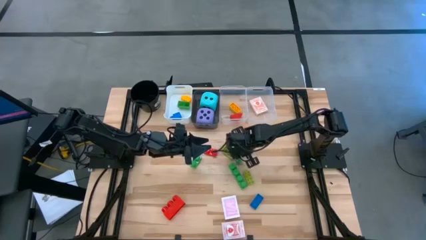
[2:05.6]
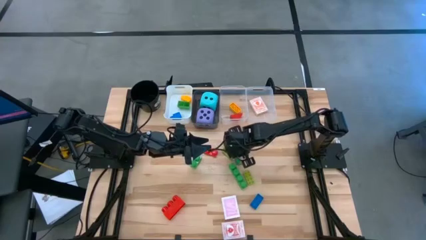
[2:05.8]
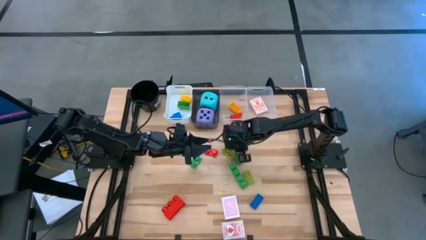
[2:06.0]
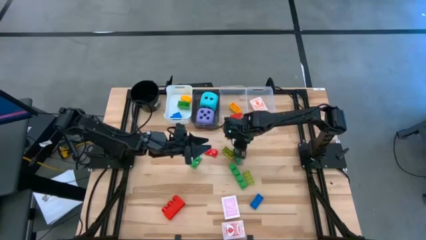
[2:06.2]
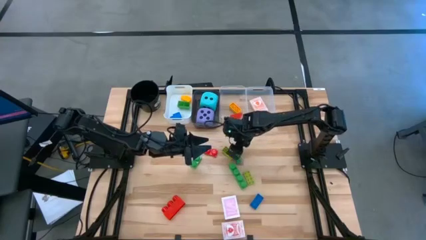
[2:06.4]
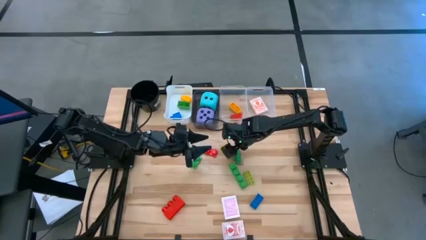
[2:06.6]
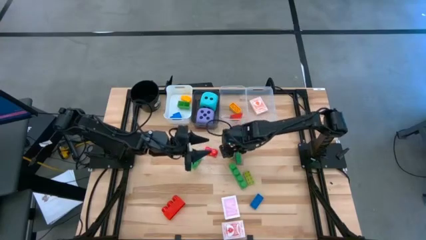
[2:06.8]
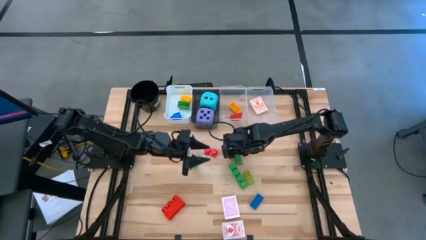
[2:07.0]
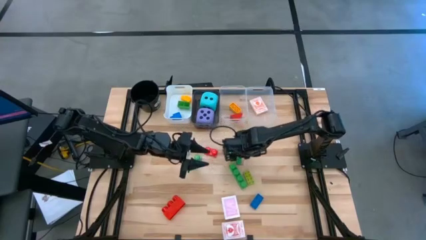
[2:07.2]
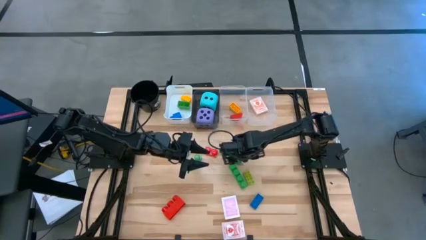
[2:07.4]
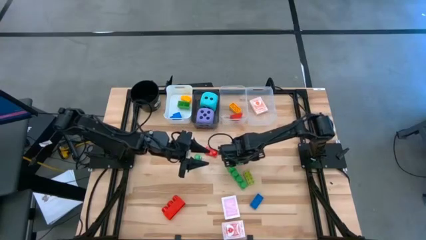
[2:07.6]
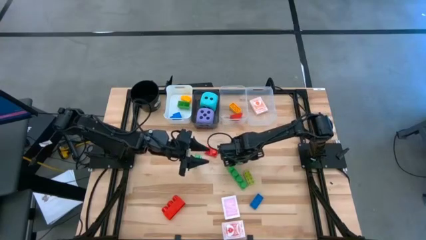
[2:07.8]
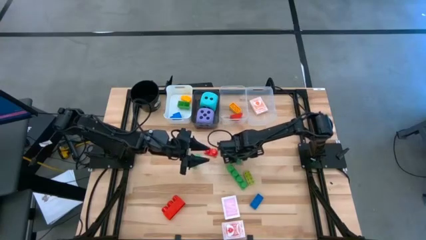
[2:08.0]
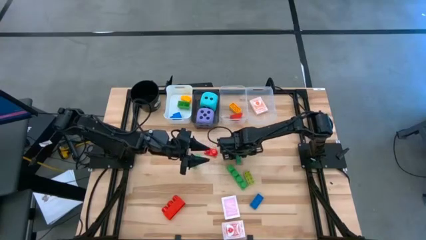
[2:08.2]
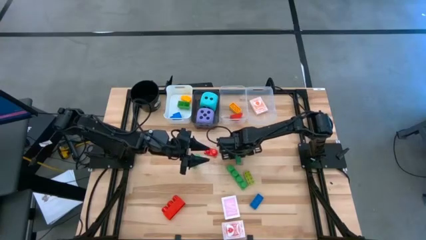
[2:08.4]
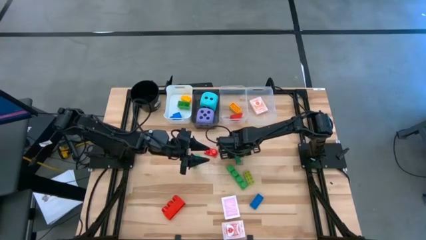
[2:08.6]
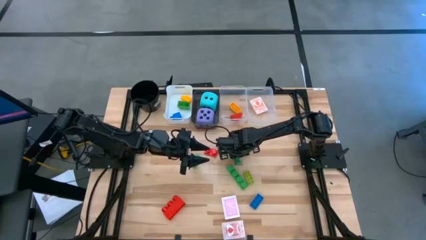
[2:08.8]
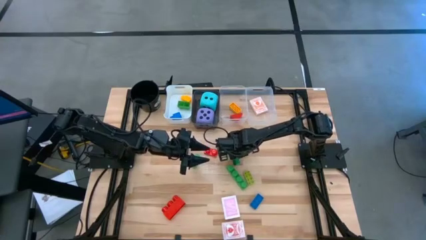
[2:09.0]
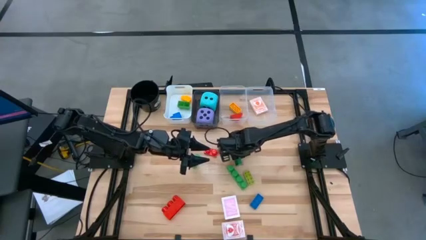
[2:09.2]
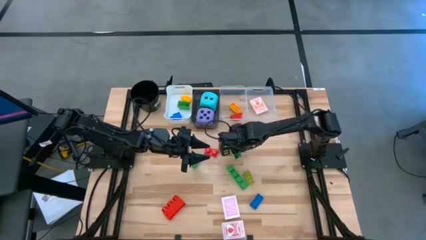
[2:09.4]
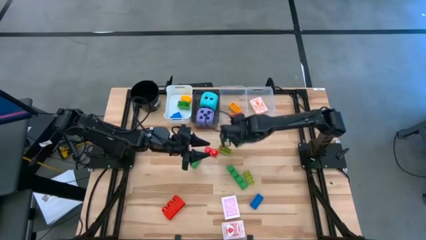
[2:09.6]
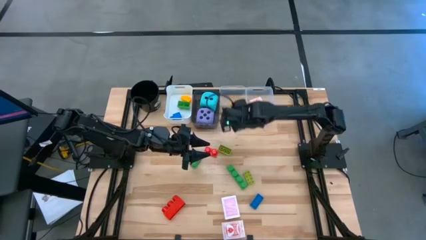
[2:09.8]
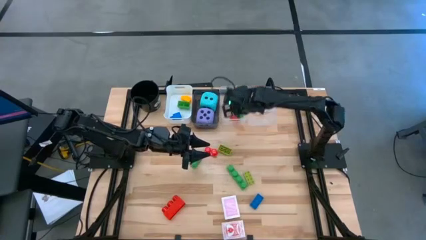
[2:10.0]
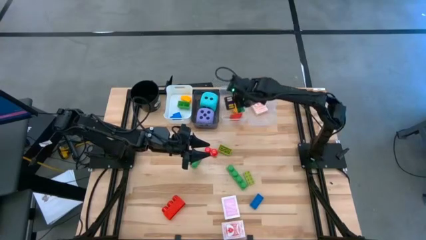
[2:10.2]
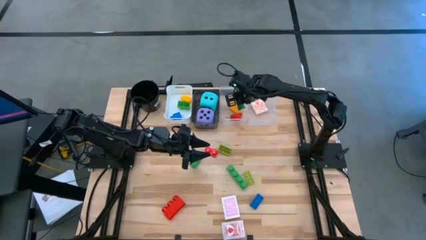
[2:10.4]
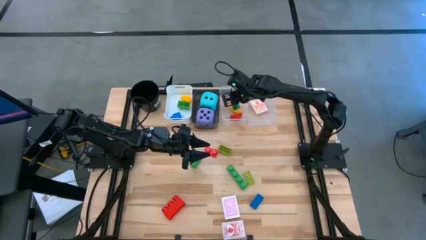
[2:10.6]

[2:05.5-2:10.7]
Task: Pick & Place Toys
Put the small dark green 8-stud game piece into the left transparent bin

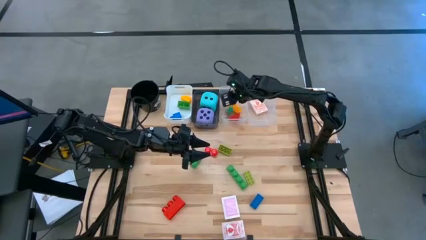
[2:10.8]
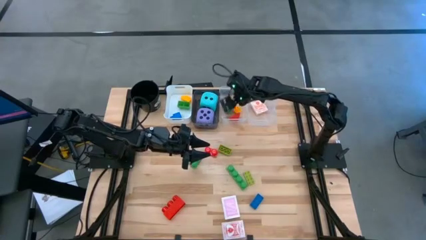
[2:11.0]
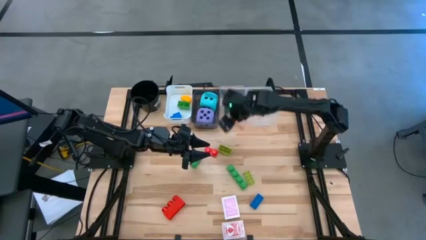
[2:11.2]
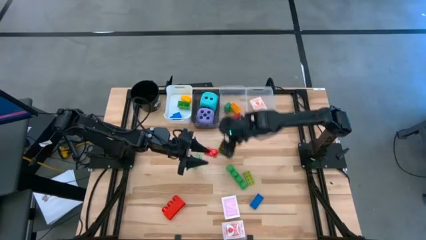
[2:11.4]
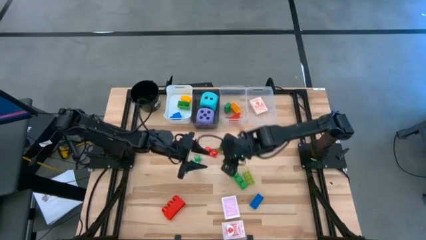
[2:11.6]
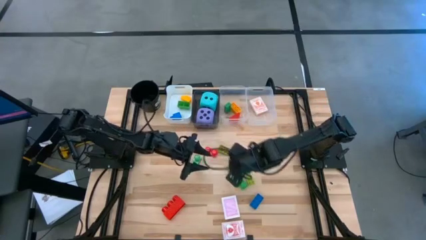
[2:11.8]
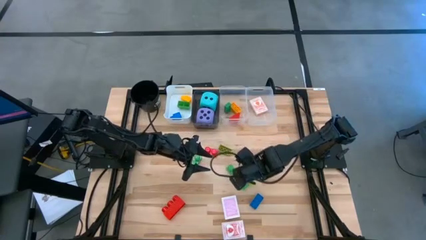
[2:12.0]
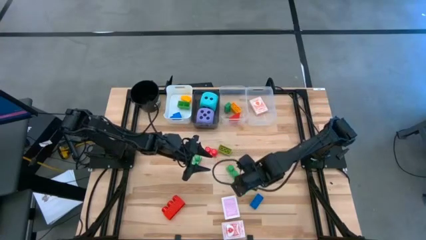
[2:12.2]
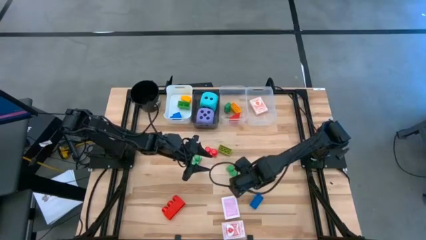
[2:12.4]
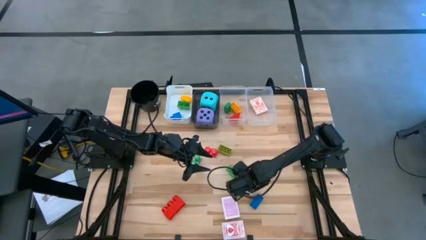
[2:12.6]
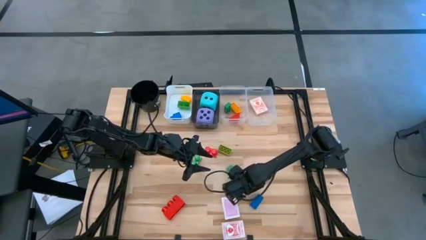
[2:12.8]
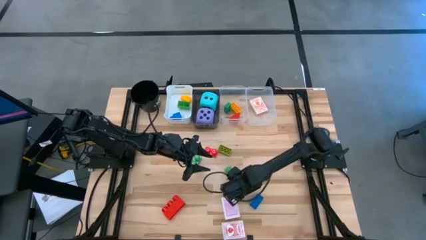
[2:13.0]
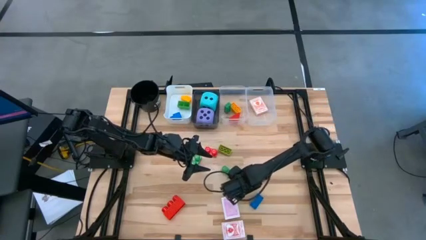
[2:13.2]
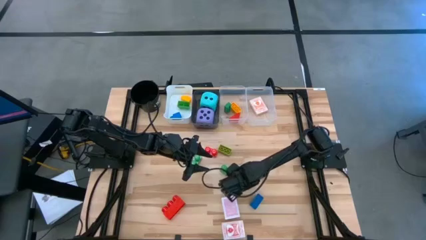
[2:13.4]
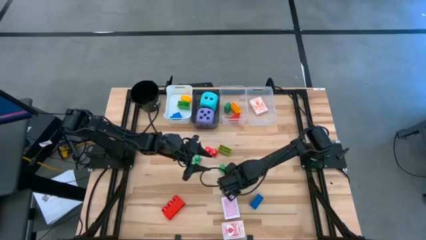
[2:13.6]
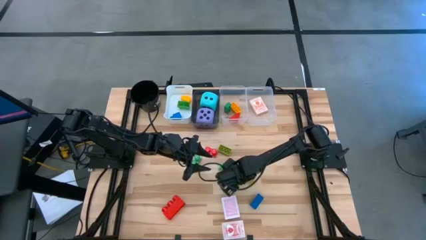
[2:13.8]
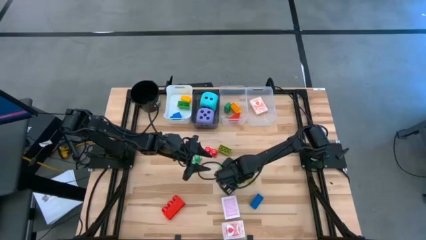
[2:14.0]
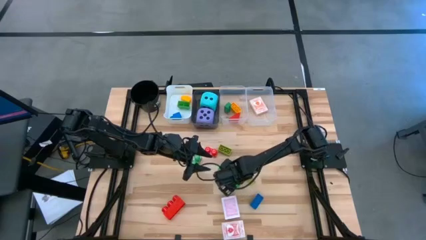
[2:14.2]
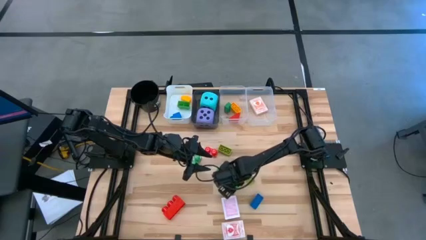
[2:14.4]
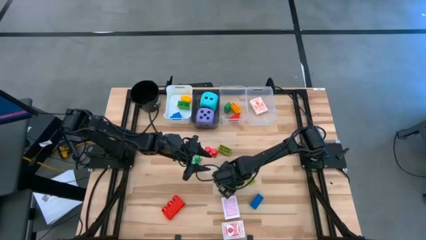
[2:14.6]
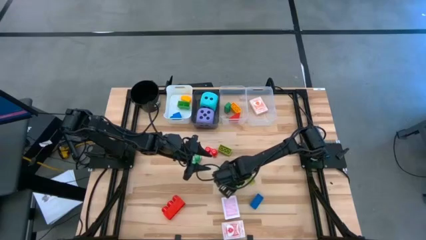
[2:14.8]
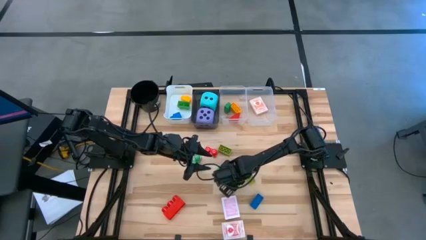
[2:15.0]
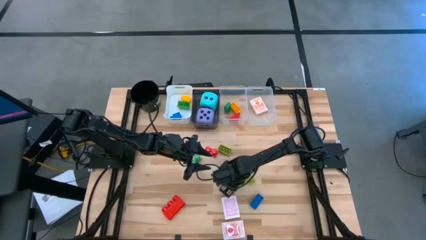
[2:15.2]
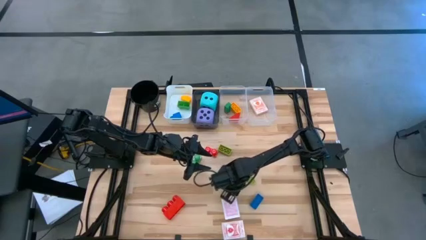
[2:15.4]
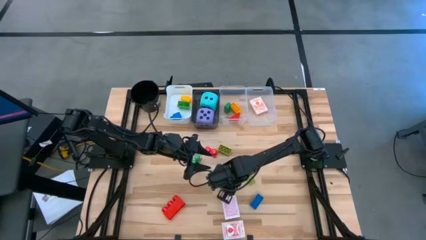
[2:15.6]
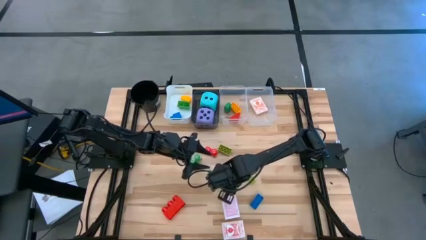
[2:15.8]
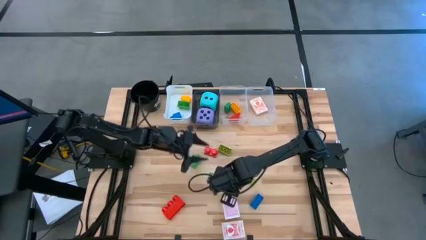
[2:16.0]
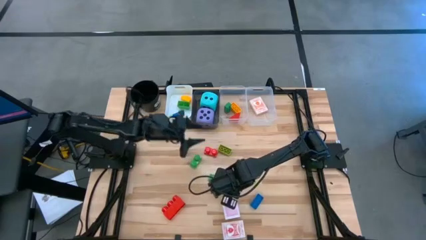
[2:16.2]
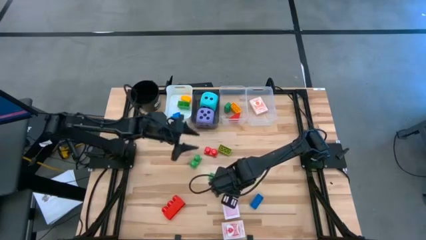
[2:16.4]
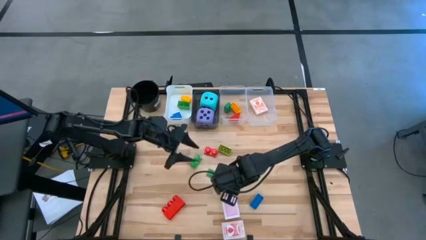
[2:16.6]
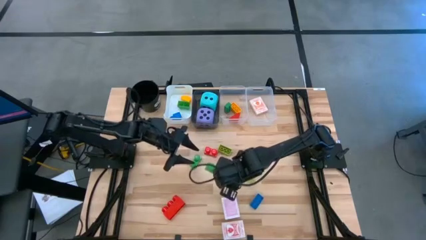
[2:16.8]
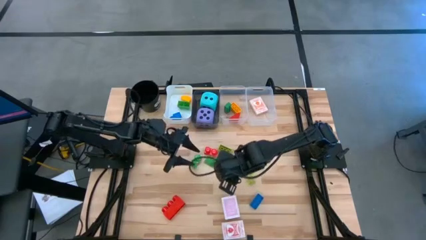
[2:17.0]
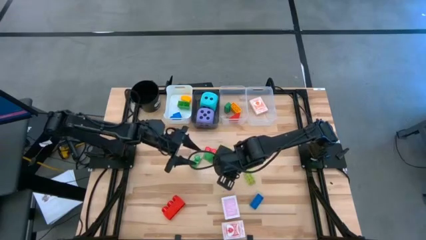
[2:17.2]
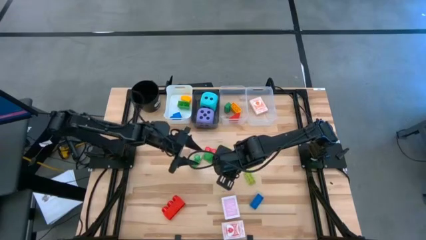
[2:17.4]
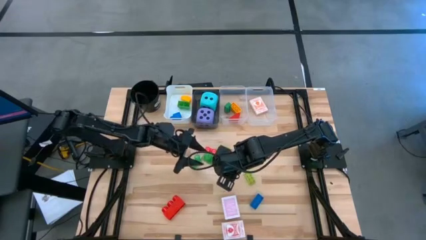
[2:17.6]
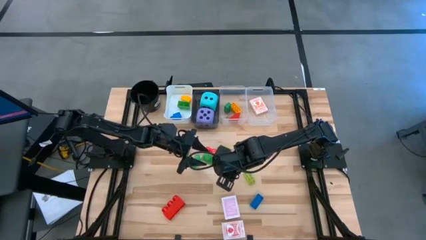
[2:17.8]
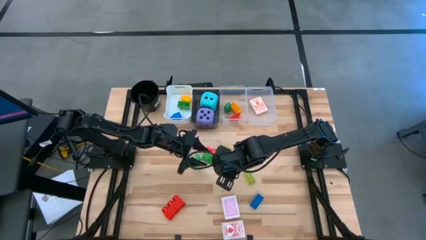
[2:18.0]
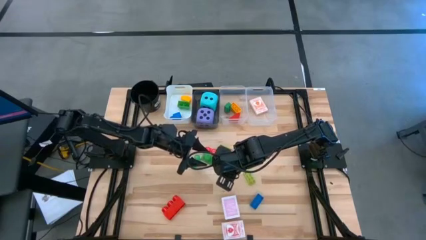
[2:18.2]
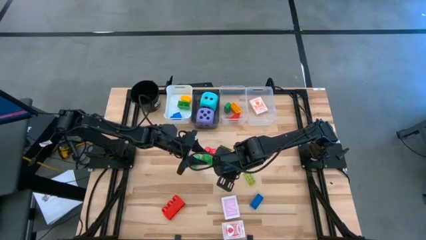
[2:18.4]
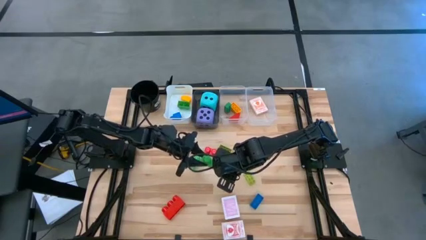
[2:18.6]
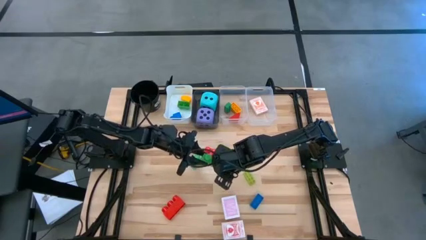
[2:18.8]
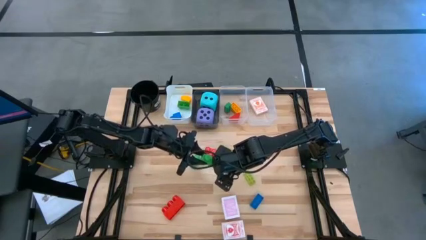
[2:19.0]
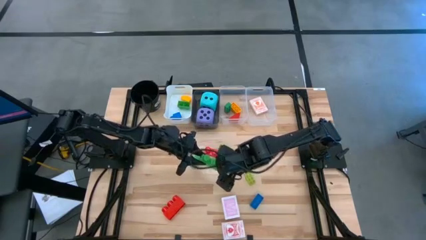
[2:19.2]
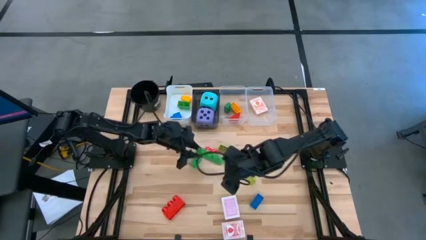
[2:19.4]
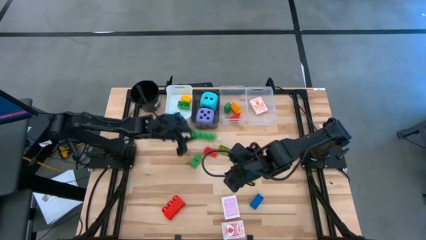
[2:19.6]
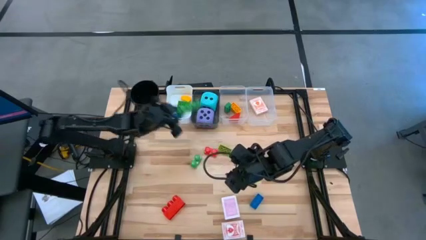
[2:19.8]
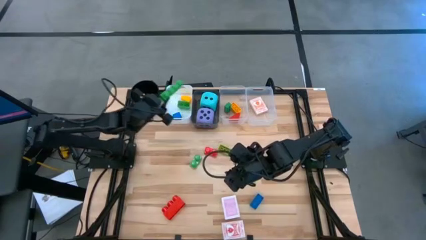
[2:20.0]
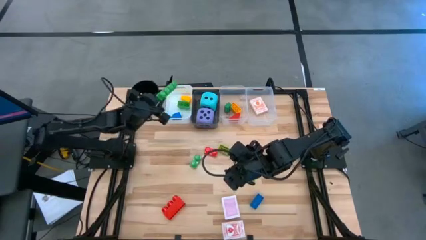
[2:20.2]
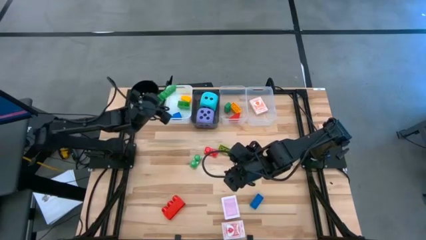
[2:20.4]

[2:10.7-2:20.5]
Put the big green 4-stud game piece into the white bin
